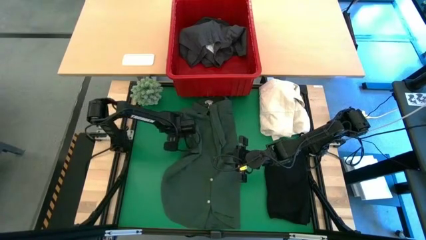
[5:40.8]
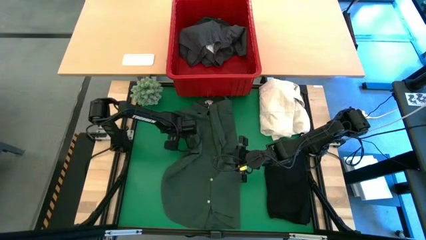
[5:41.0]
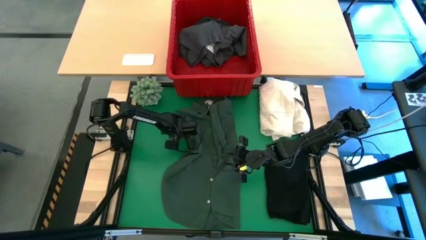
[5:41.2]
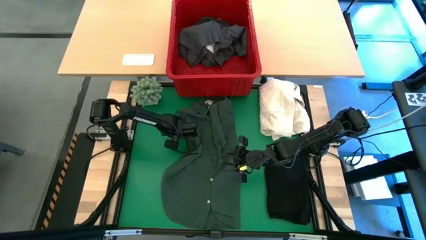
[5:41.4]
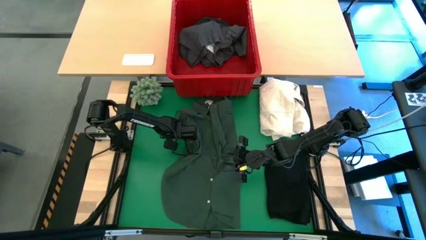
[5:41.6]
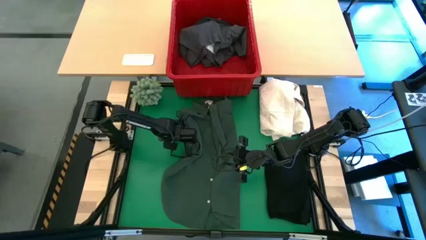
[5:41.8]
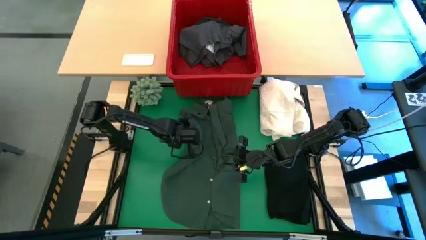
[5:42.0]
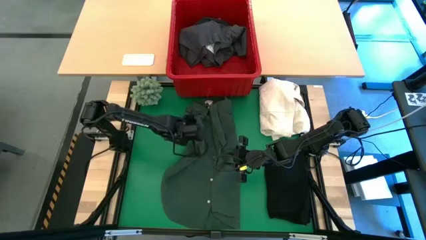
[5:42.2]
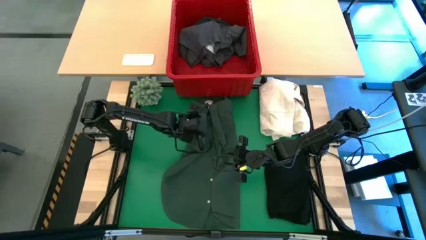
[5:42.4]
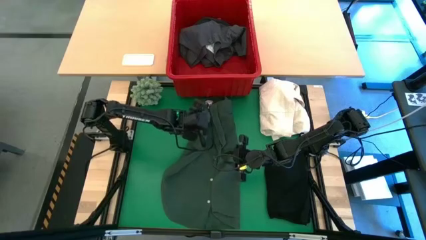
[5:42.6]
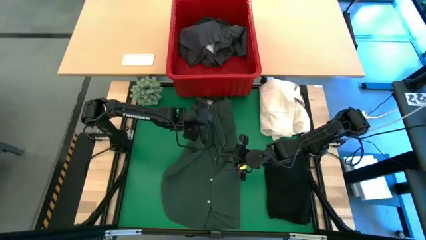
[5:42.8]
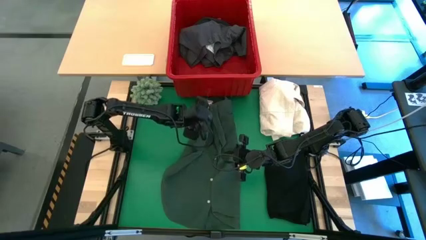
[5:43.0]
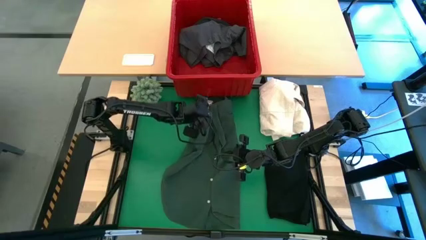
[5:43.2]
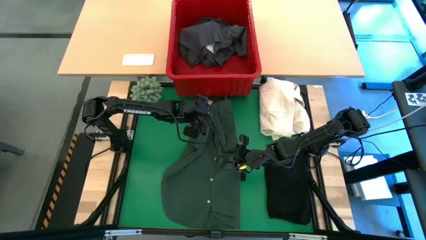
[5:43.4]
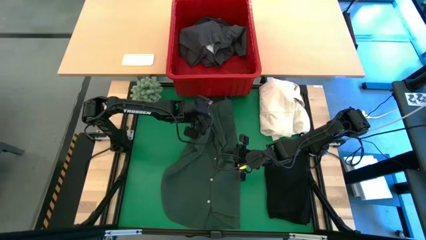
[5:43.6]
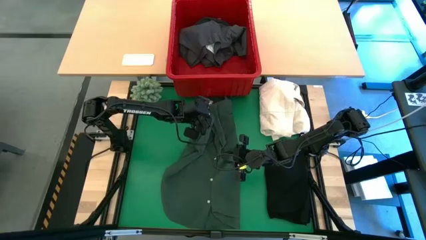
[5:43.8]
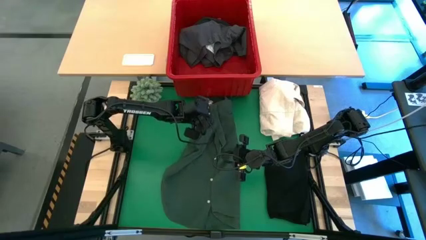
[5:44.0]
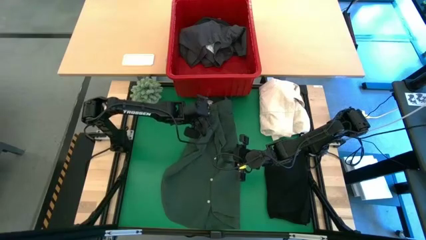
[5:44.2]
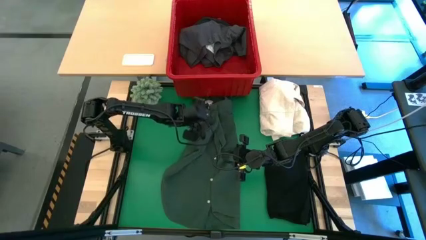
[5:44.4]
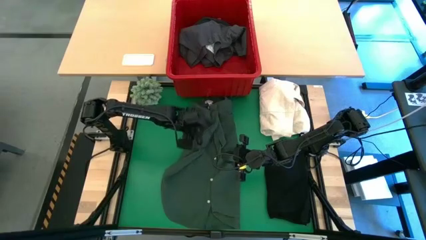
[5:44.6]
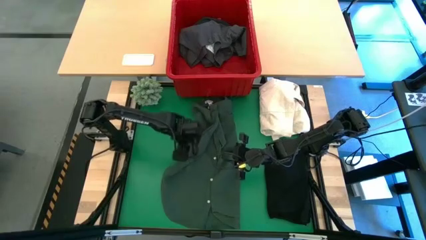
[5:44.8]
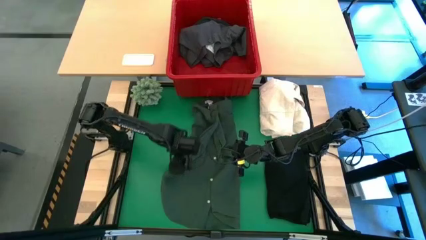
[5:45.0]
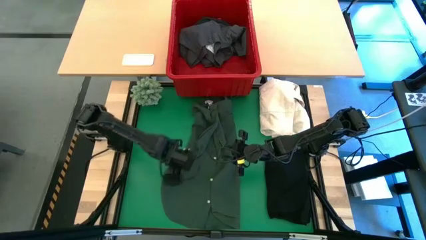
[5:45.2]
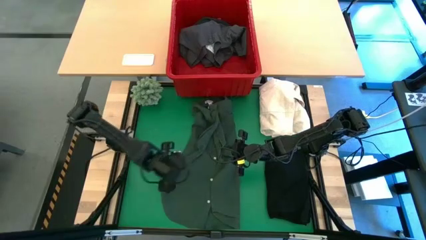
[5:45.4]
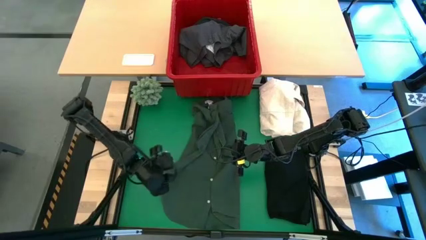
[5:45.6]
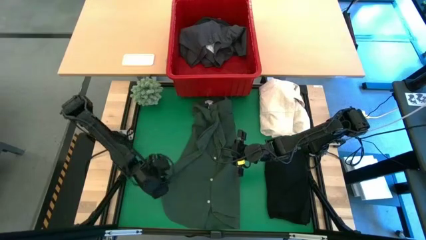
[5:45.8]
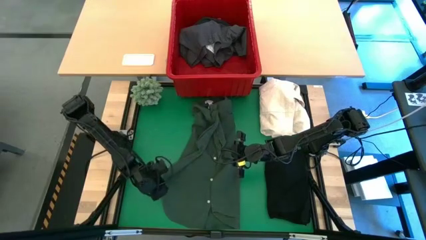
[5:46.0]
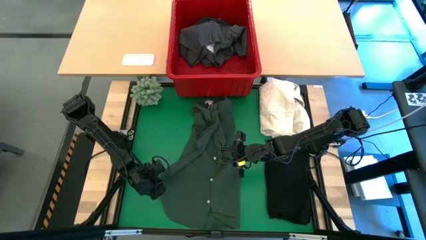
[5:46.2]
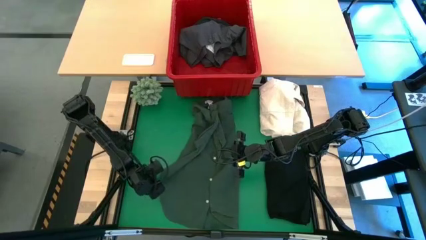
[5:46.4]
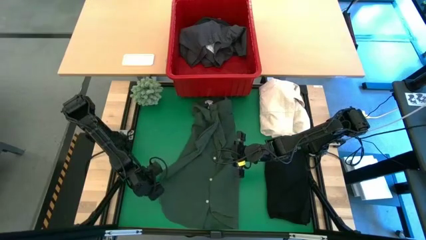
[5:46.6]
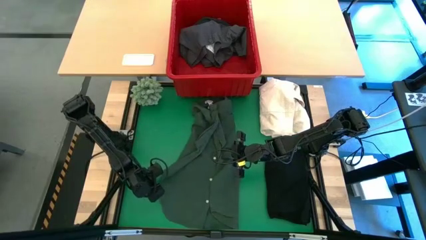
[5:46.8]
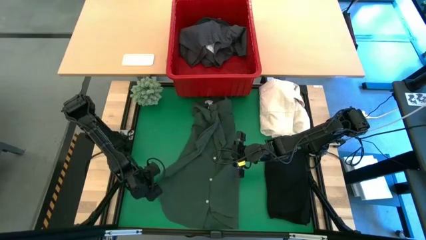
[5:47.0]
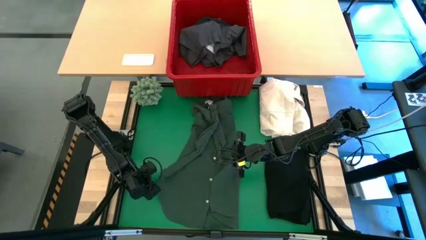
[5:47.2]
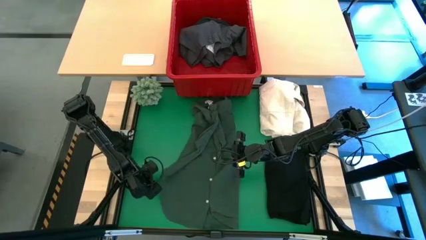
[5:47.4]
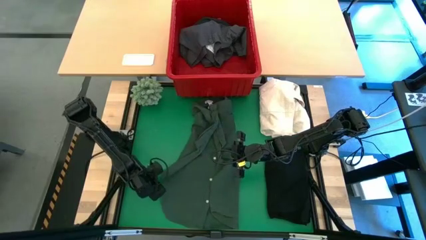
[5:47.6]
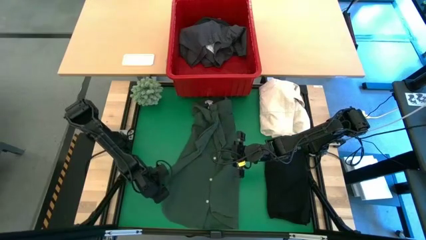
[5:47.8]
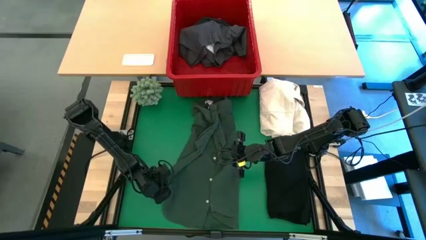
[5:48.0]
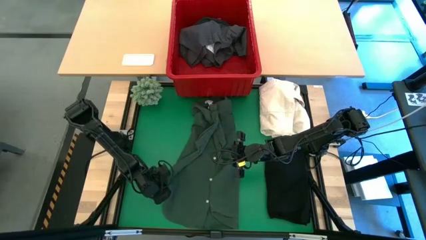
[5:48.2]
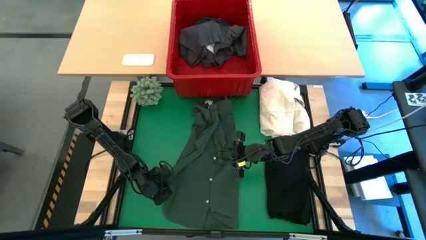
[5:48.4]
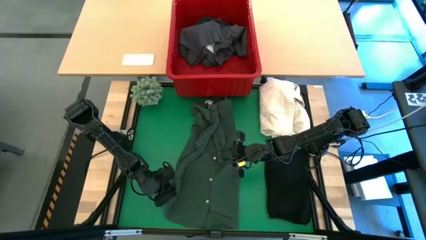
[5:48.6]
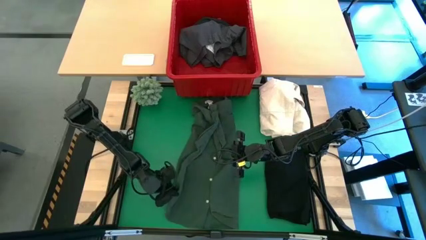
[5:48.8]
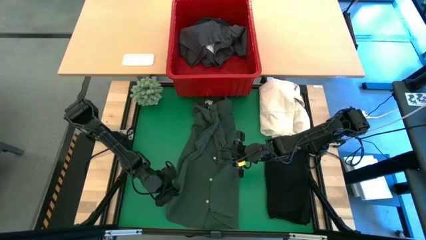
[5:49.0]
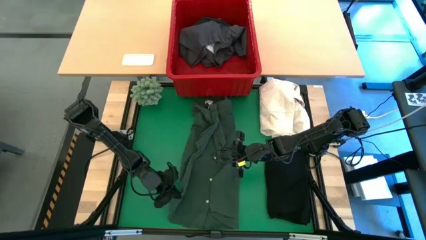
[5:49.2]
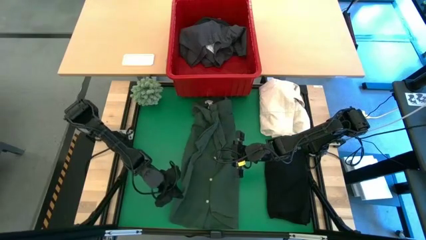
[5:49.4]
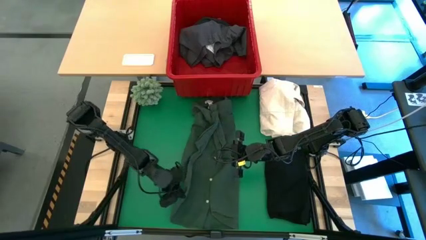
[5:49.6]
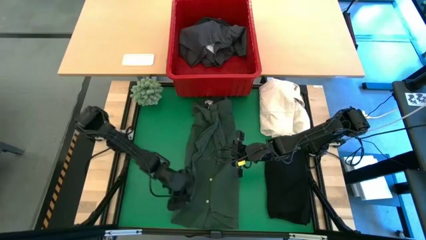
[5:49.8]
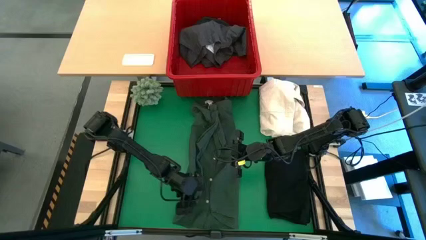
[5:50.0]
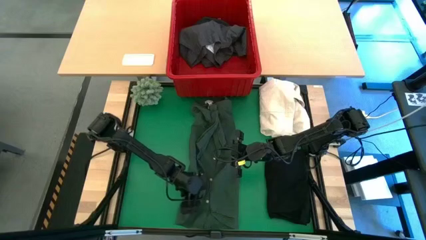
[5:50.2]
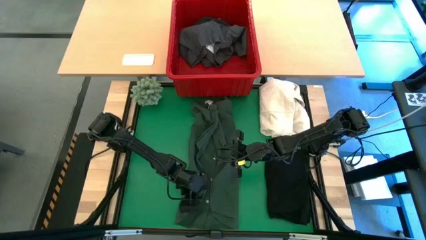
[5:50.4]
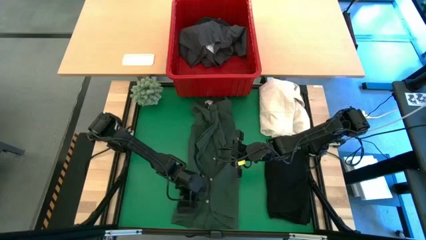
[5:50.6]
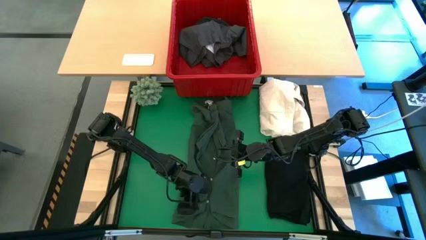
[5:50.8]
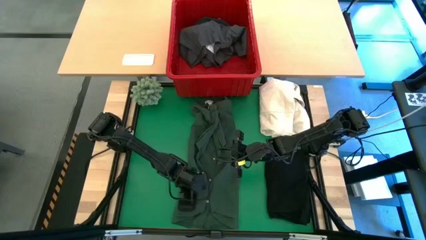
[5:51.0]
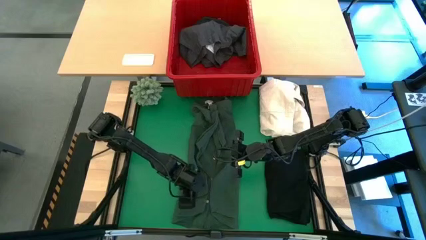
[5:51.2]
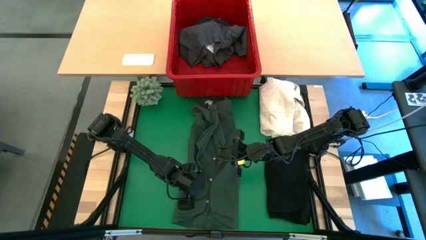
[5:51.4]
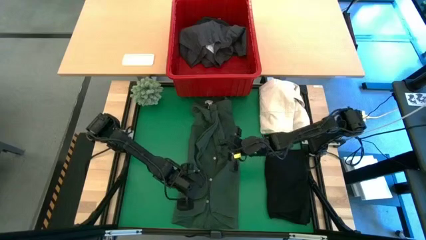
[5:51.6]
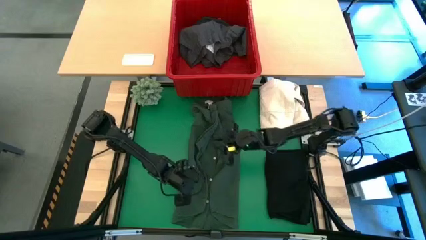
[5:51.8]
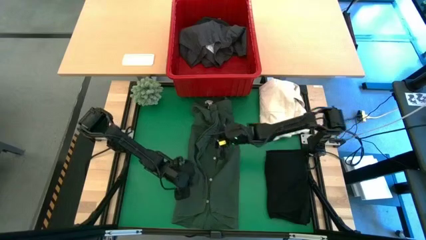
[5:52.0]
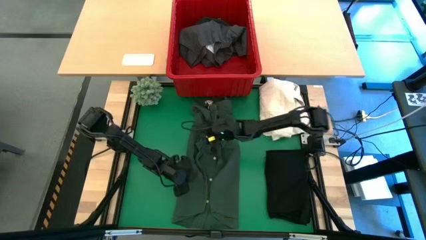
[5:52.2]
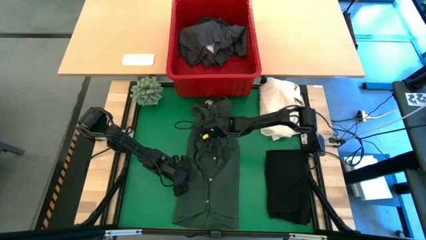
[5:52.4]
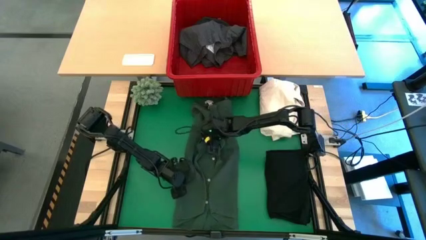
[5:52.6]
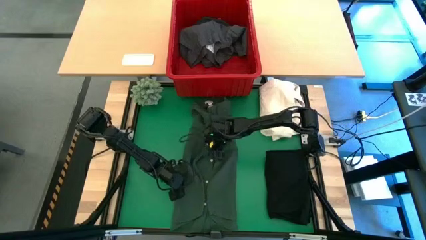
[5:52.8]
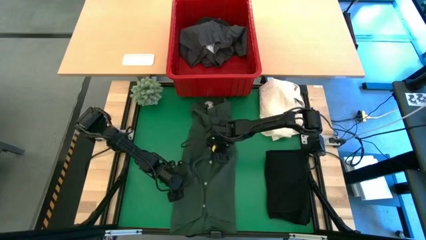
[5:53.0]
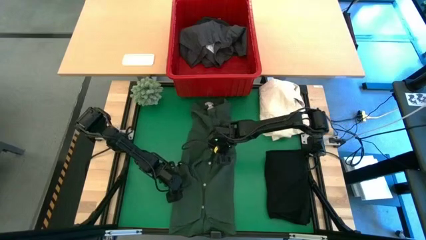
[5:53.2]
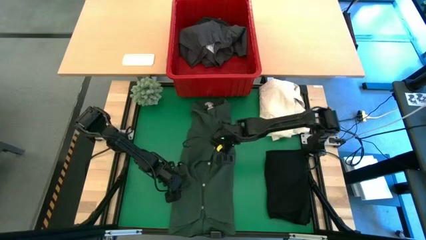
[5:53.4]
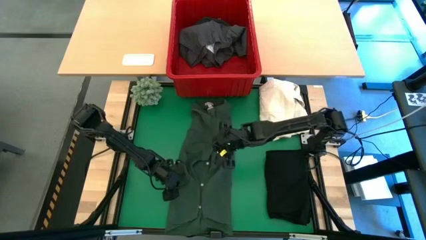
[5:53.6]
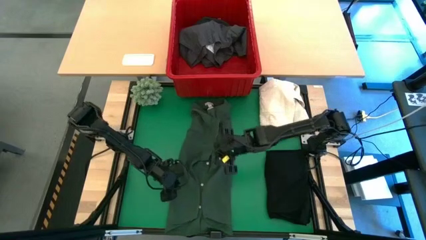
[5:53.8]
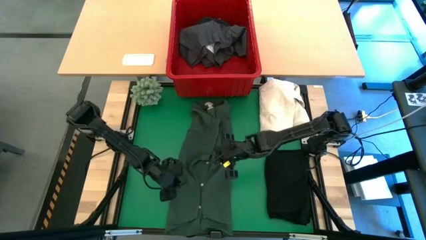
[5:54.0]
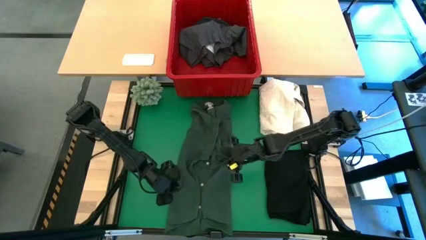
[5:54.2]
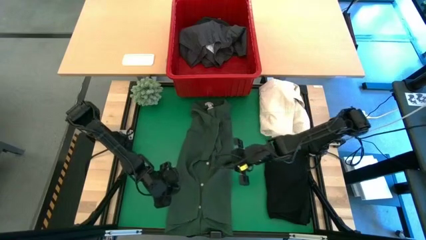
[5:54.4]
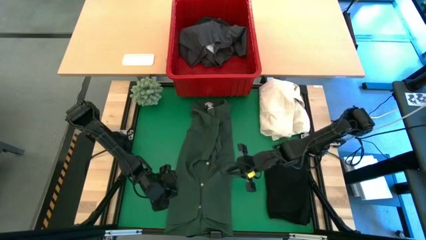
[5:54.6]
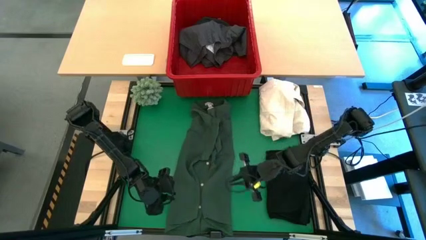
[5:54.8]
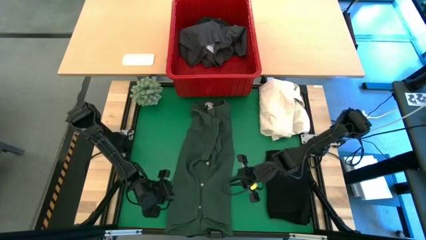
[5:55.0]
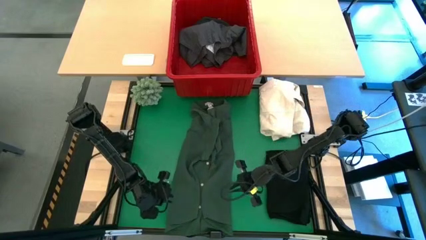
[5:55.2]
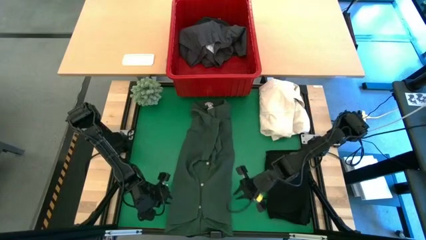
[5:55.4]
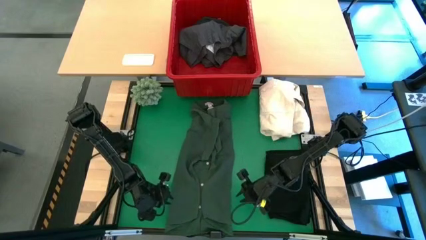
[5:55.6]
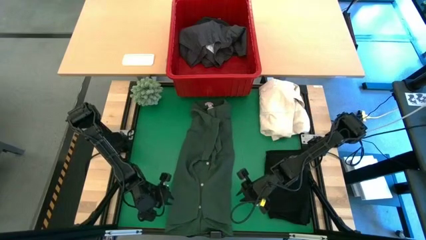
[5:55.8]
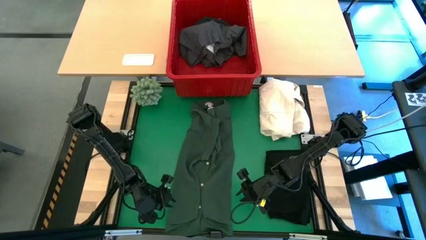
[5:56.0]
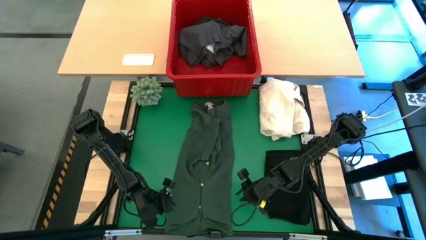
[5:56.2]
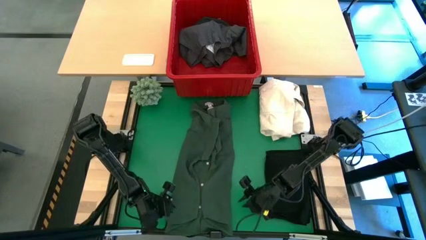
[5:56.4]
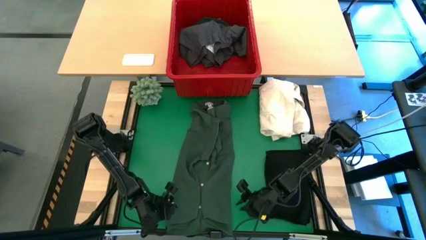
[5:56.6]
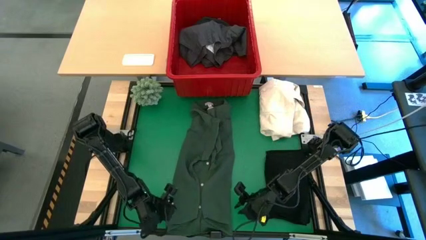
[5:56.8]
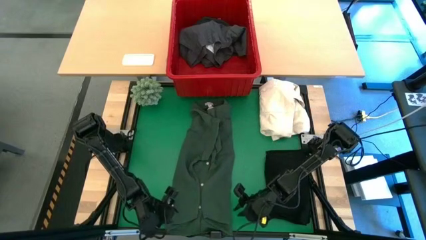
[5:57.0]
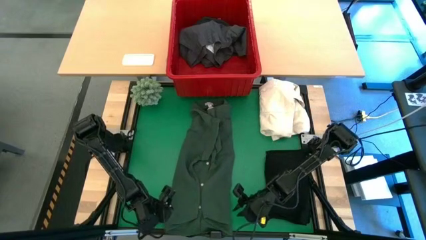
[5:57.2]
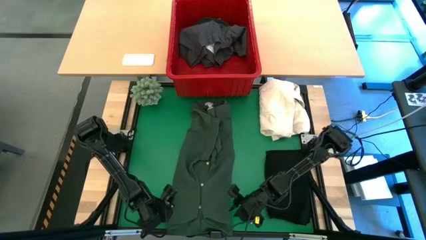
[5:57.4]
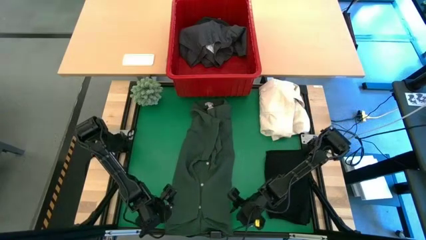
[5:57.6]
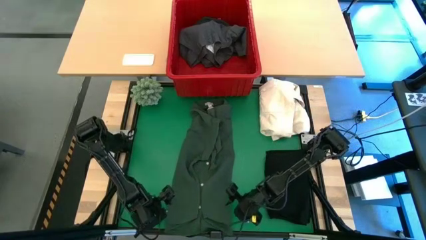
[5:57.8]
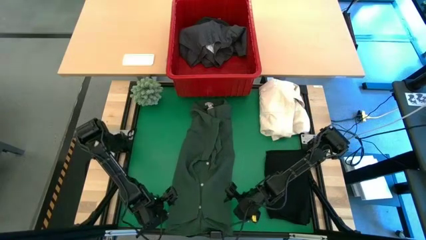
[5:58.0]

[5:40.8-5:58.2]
Task: Fold laundry
Fold the green polo shirt
